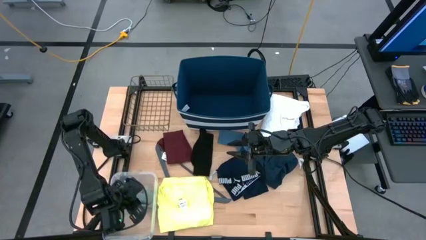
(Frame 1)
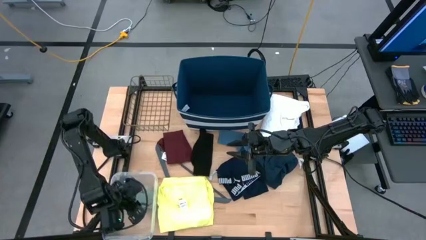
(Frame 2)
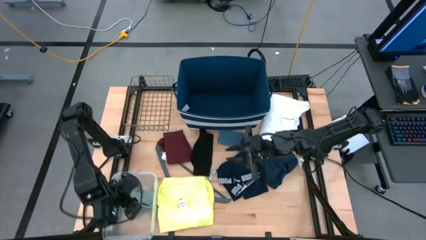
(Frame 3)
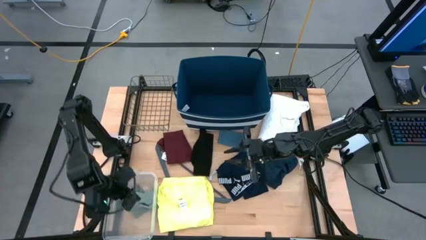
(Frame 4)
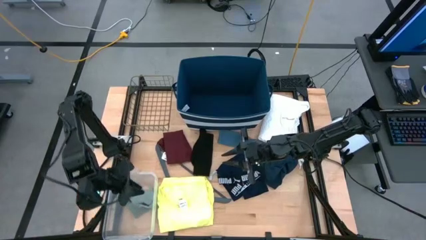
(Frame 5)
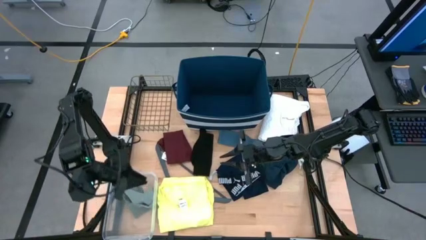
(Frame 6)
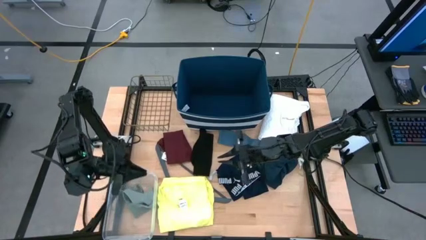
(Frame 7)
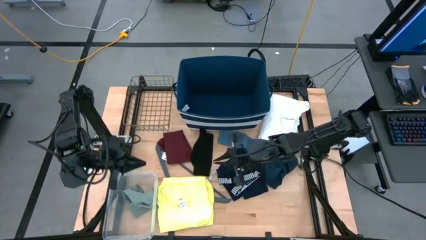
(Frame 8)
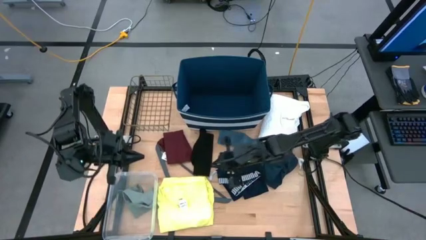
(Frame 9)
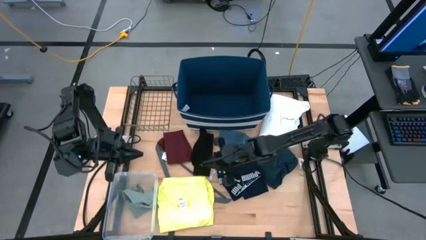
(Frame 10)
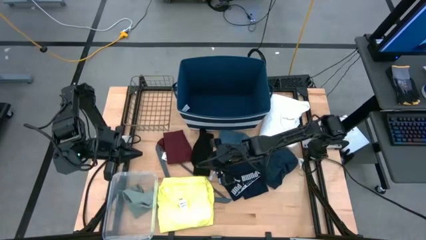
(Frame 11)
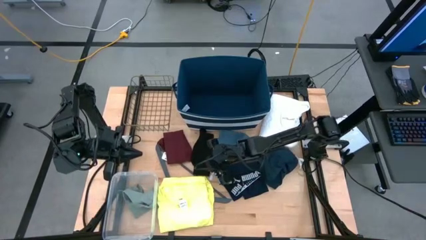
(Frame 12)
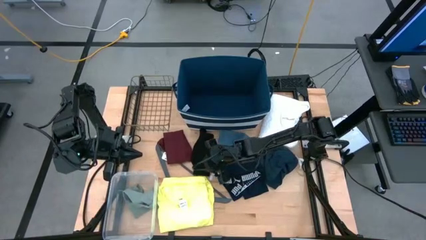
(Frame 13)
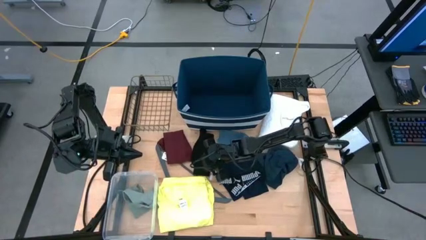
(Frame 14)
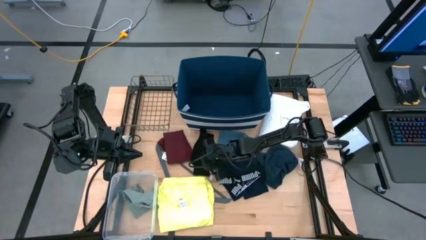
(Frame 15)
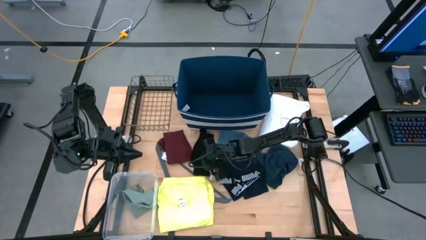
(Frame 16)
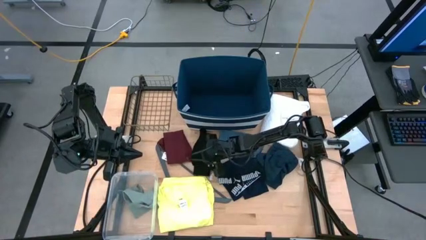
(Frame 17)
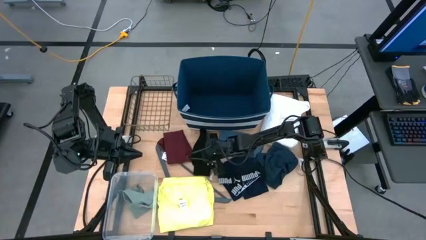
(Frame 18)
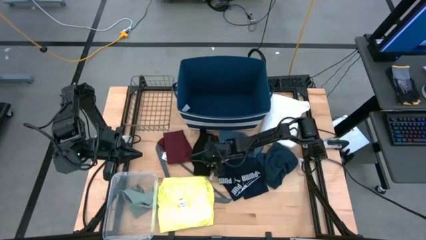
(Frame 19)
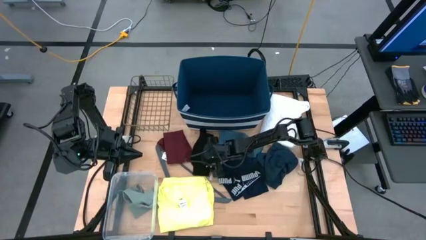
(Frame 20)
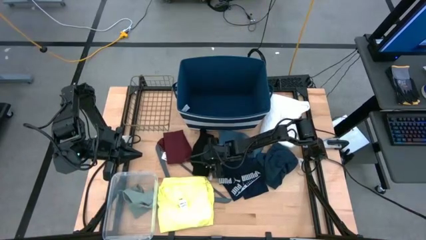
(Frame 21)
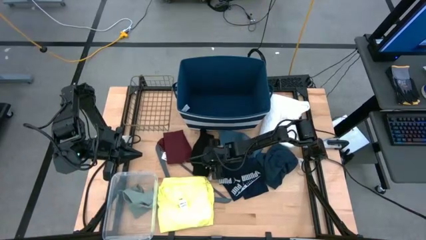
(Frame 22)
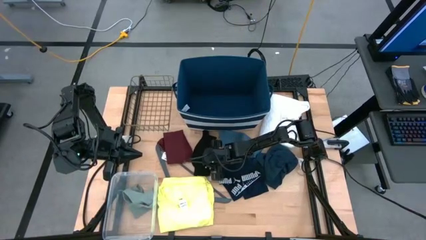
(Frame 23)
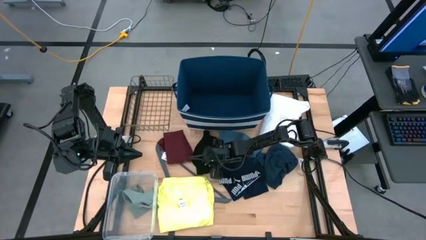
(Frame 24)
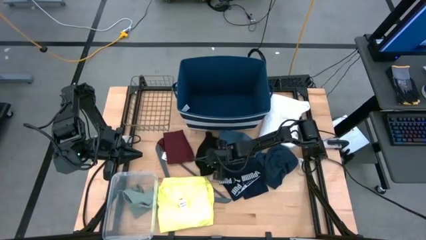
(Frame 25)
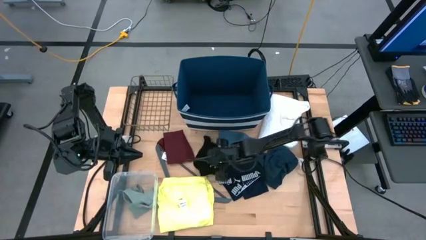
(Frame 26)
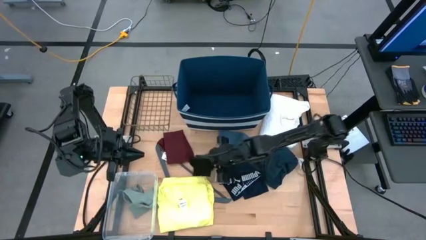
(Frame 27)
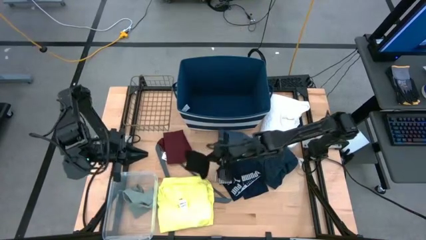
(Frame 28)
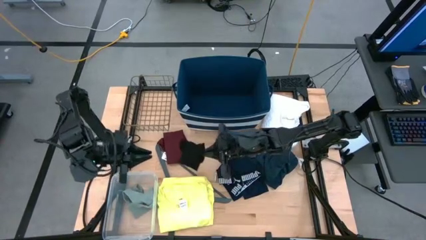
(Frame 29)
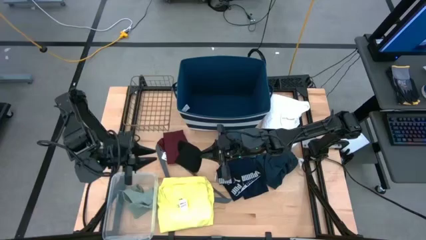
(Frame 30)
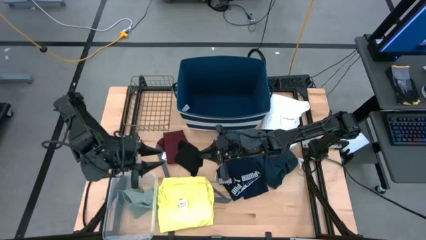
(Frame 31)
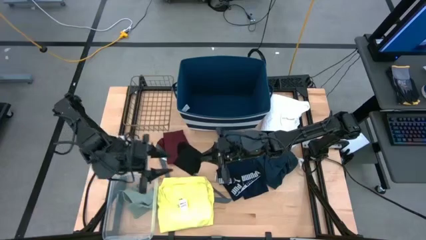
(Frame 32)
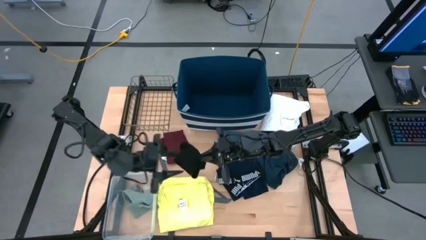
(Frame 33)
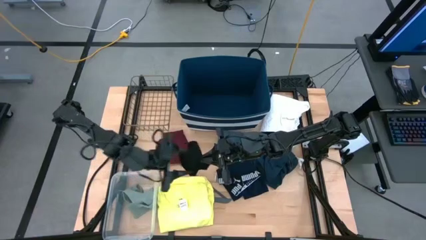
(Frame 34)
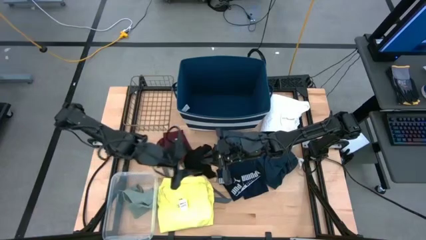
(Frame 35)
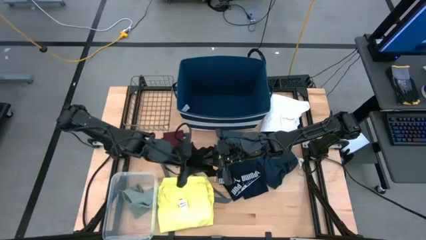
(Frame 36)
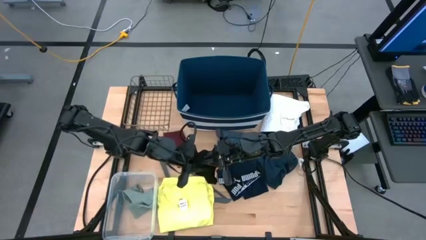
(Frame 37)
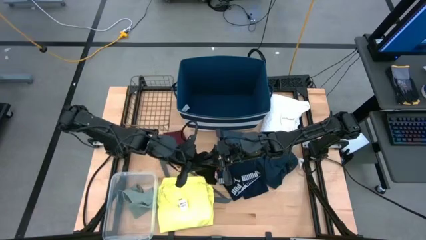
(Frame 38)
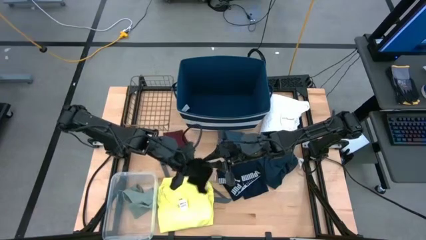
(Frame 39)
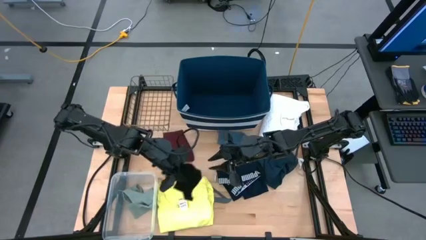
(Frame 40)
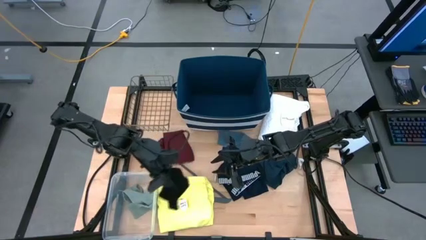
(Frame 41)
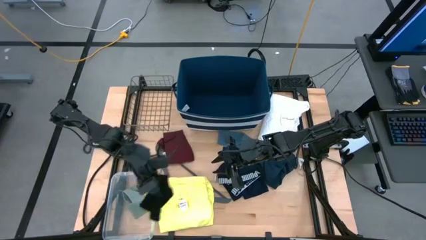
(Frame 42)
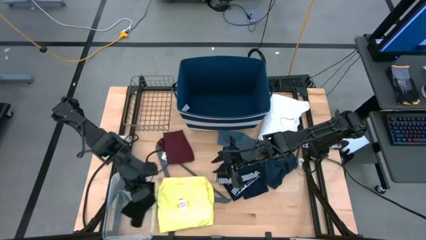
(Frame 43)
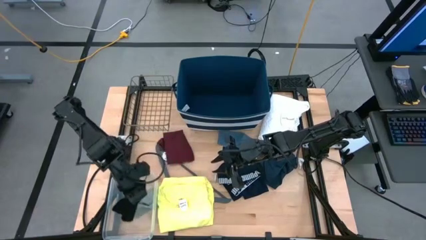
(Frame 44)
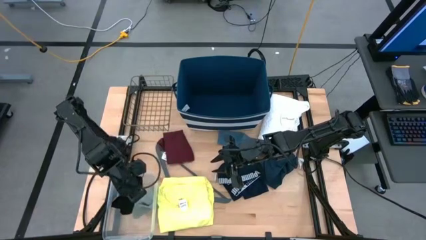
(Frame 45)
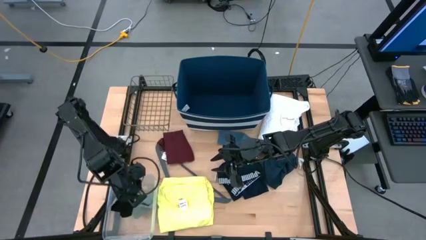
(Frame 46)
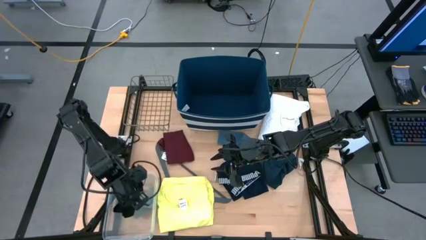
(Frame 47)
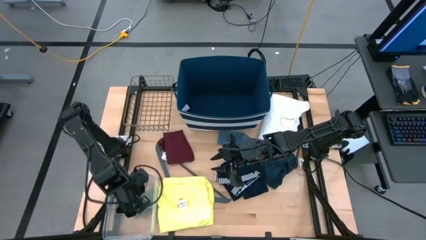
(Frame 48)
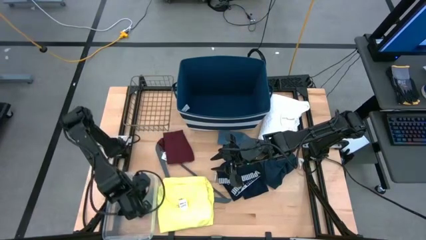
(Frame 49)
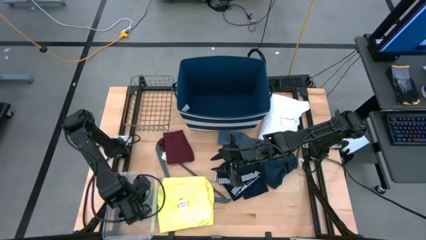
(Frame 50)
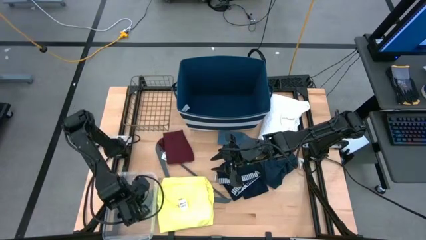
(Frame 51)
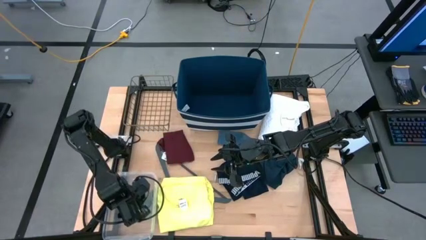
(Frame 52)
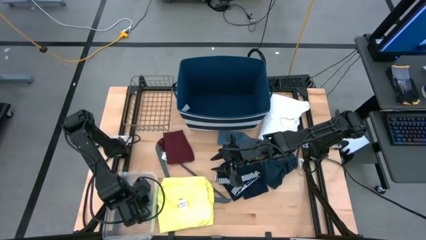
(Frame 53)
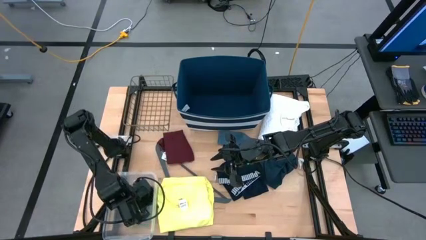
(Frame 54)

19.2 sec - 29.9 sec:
Task: Pick & Place Cloths
Put the black sock into the transparent bin

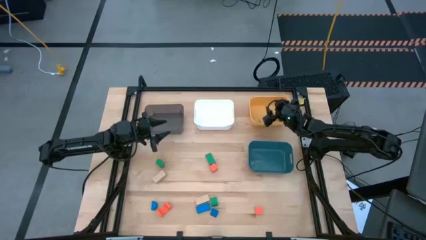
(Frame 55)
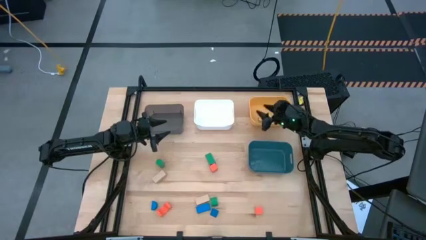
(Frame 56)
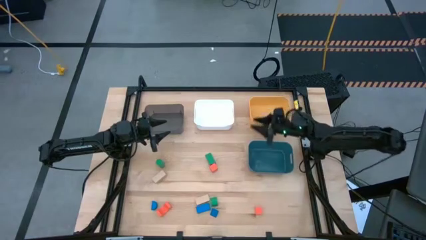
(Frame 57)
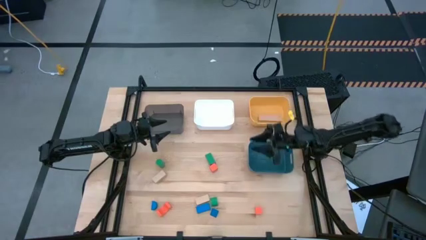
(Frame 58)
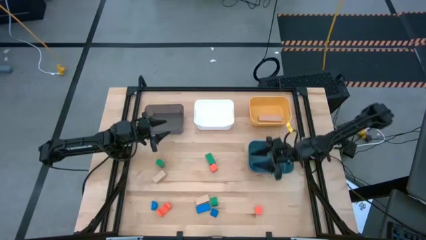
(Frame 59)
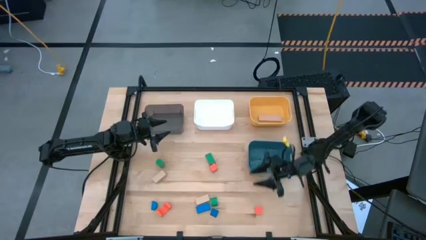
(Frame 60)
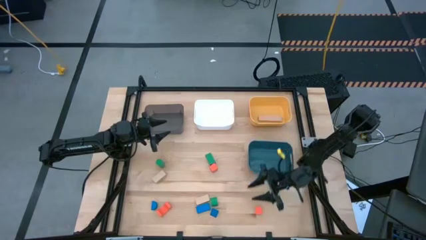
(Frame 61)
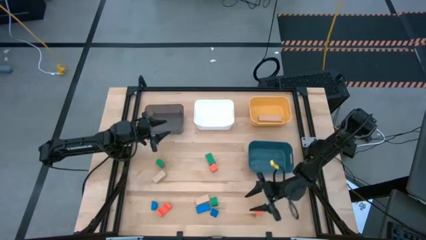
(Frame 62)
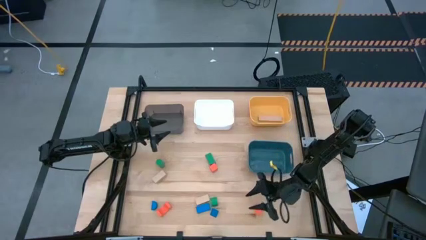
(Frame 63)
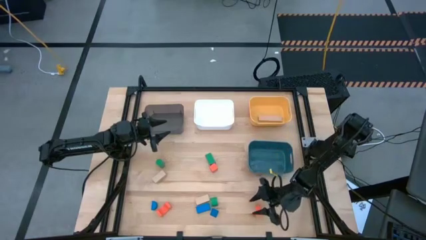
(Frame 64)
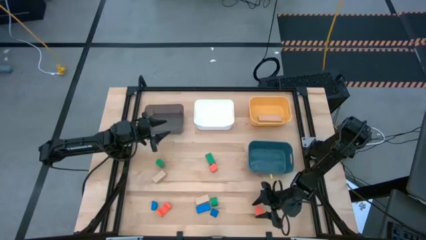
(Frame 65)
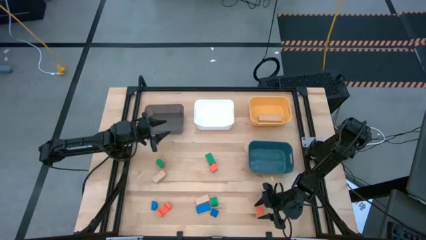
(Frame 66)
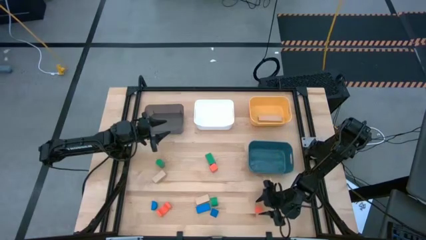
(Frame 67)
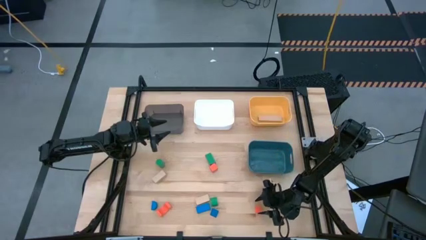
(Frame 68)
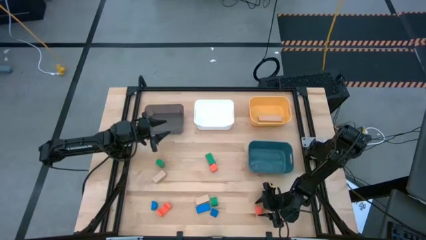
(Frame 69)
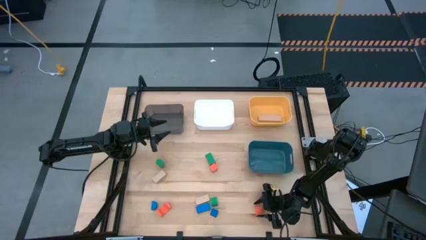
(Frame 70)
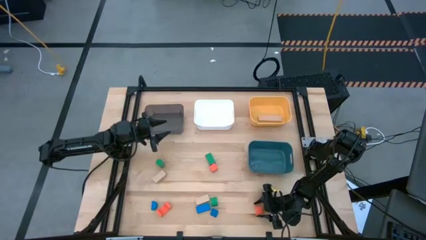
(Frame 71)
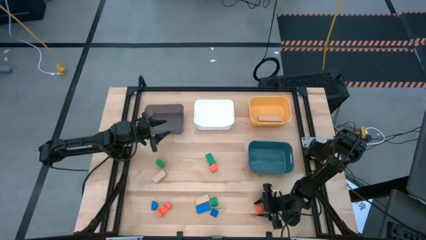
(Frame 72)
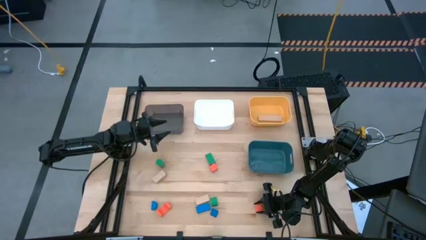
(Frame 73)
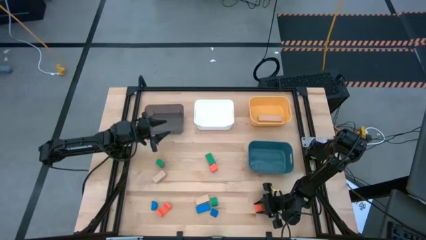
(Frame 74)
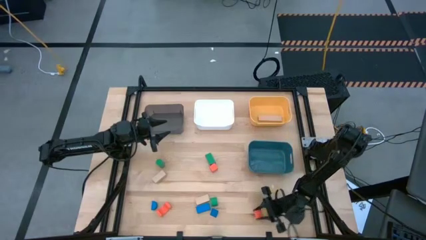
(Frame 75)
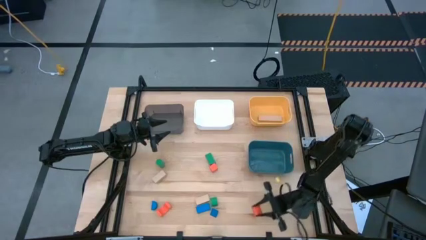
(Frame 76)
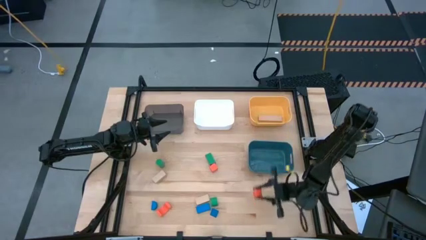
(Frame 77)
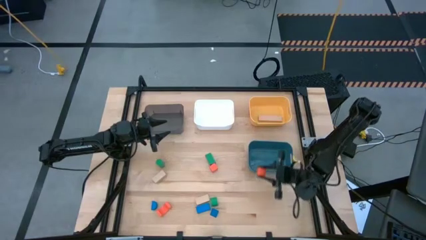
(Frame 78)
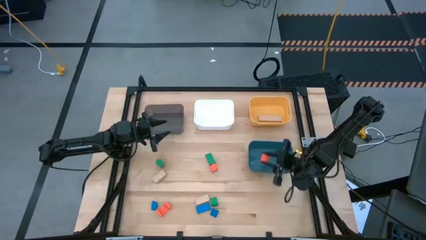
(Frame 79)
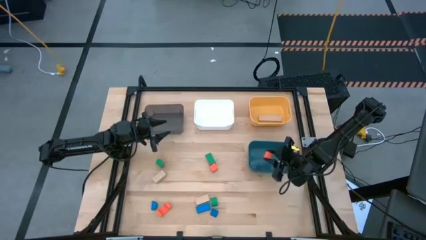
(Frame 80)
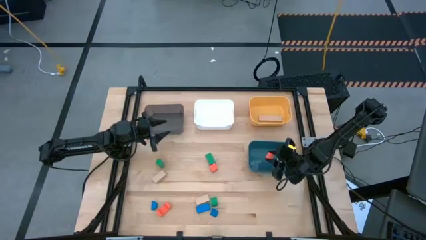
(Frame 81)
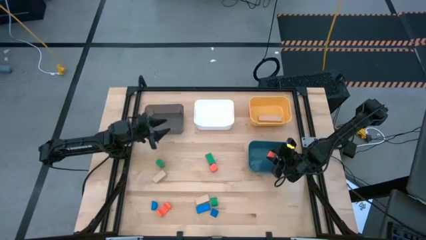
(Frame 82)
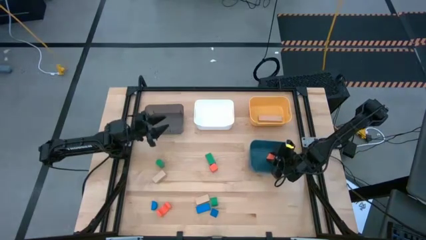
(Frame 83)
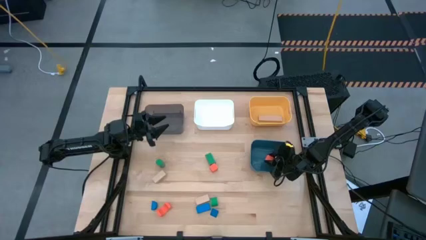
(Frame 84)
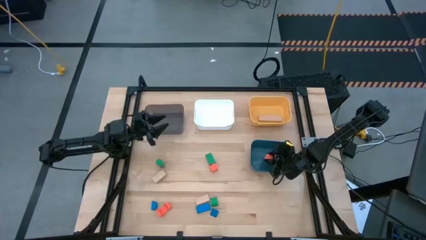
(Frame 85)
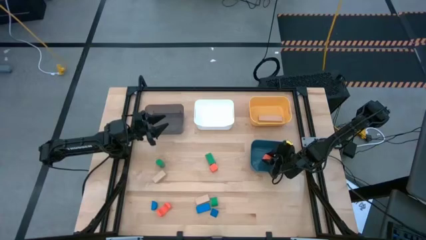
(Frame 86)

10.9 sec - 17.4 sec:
Task: Sort & place blocks by color
Put the bottom right orange block into the blue bin
